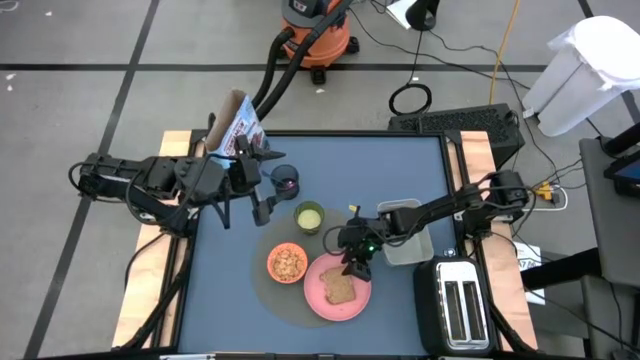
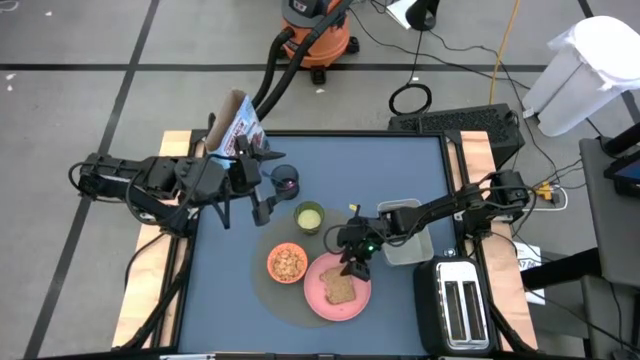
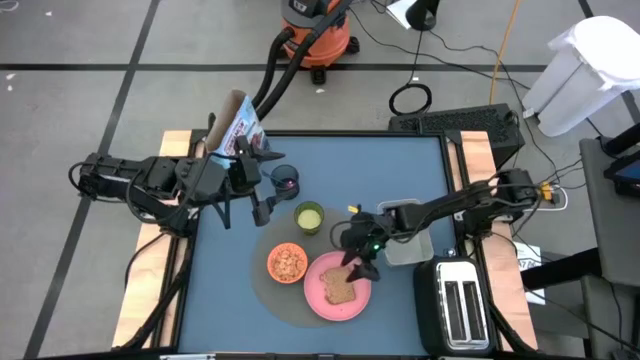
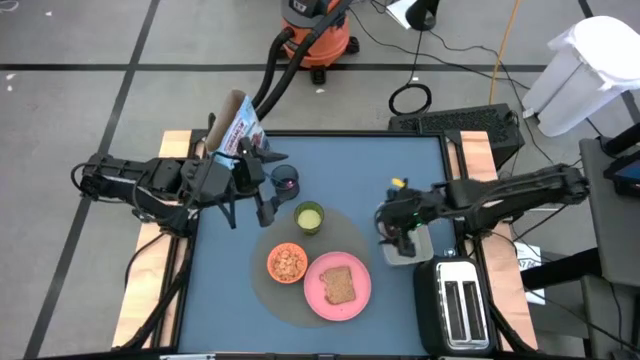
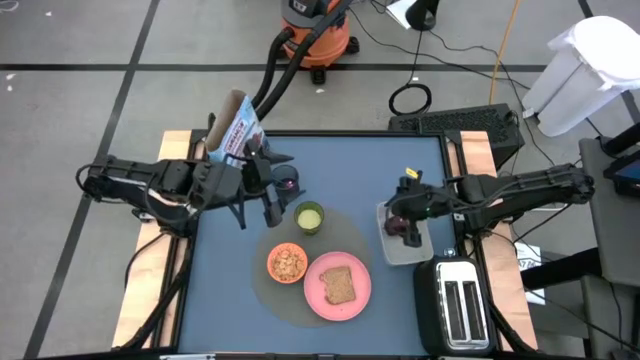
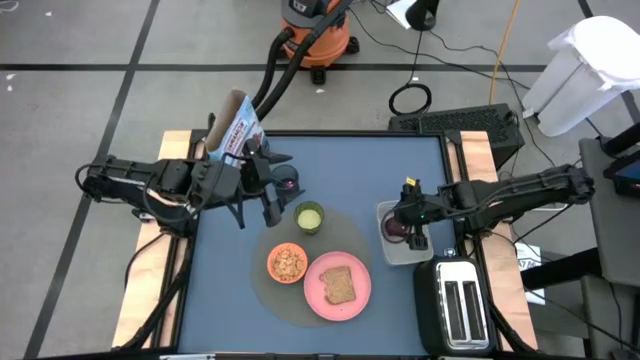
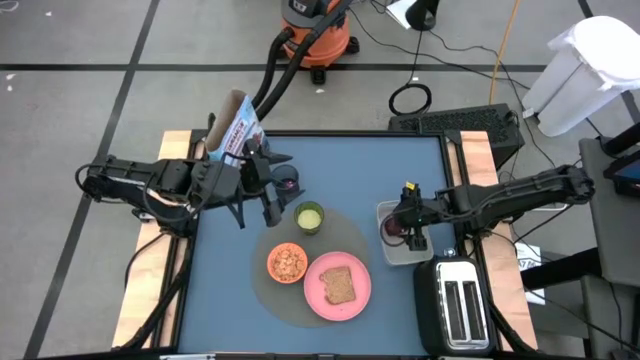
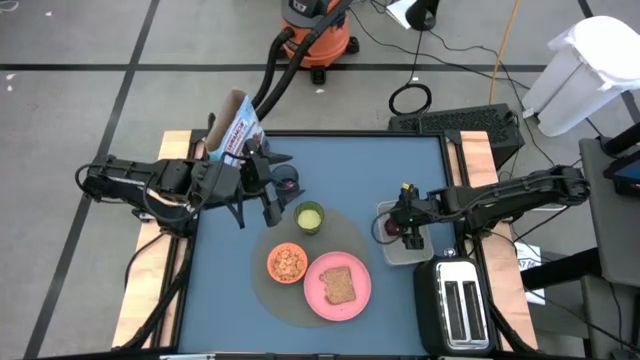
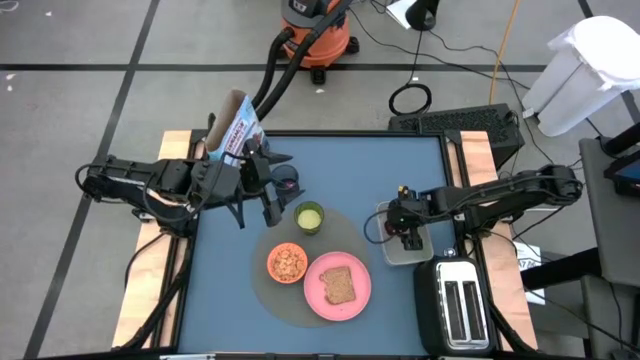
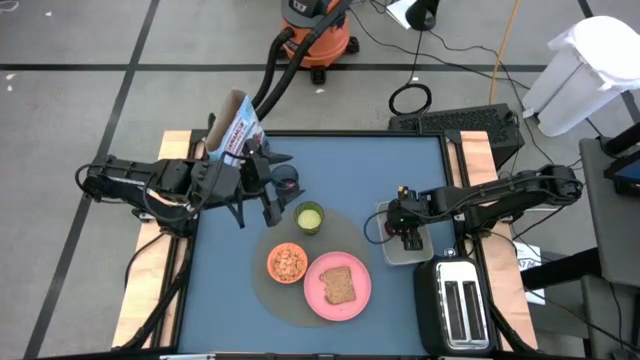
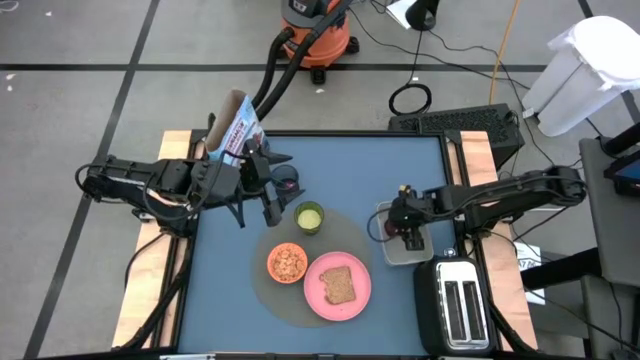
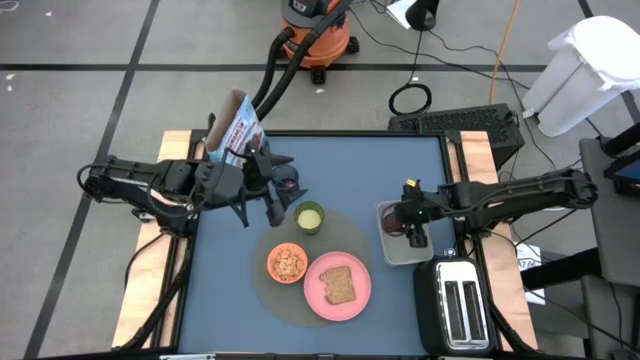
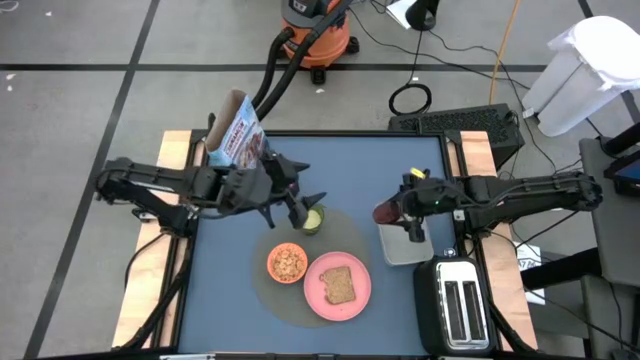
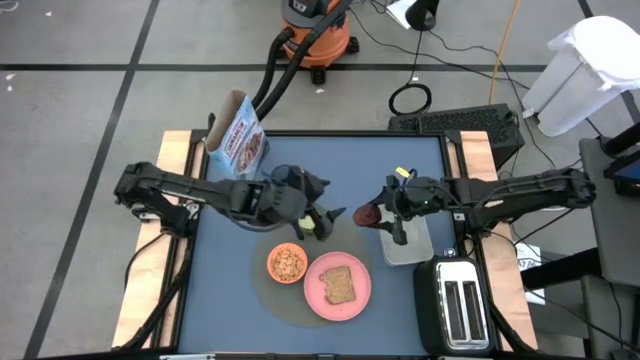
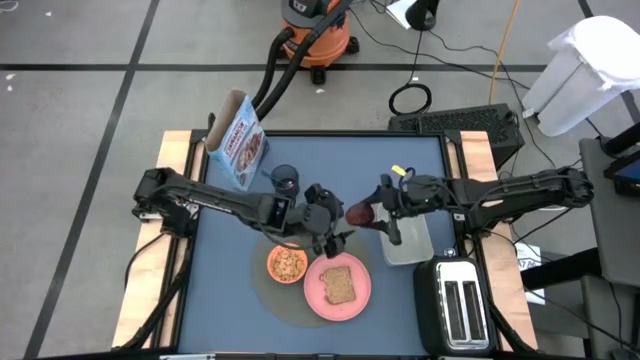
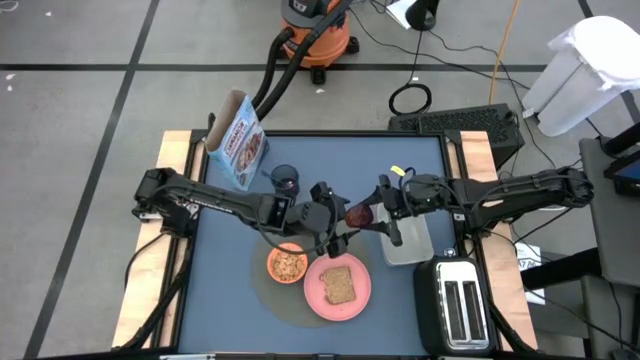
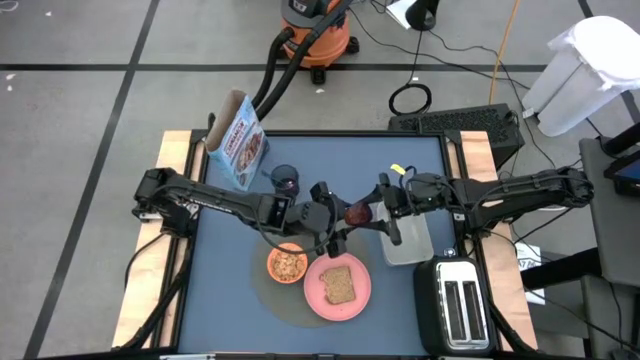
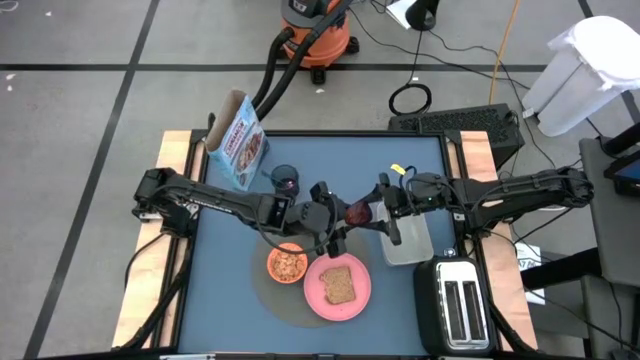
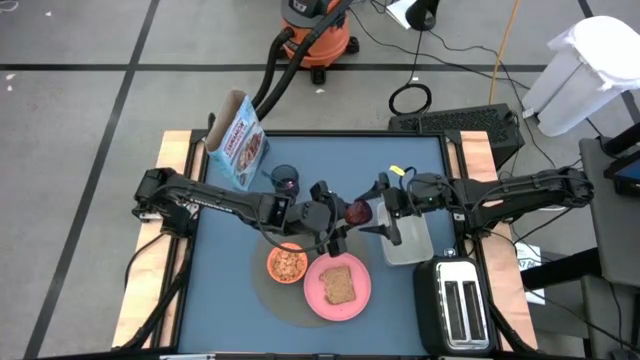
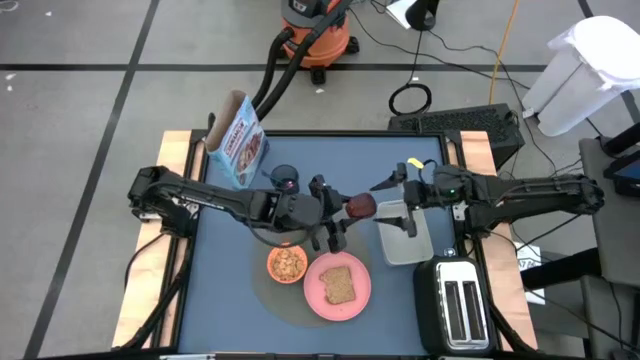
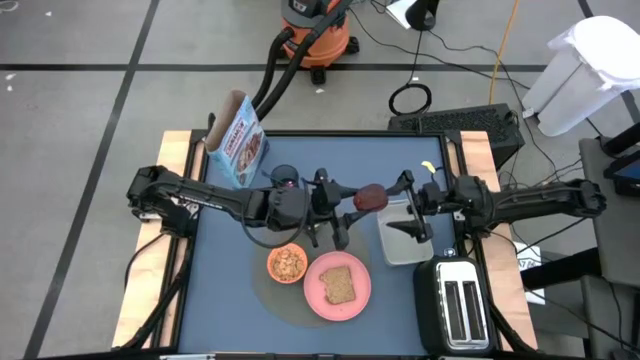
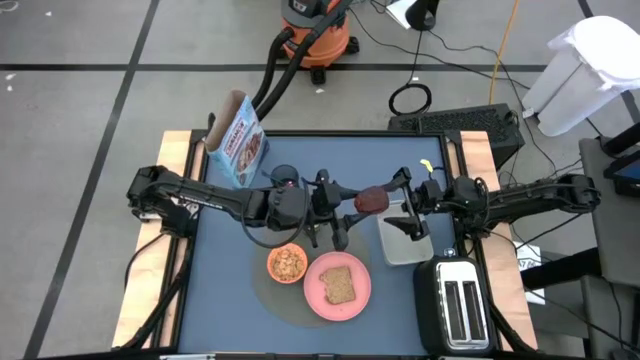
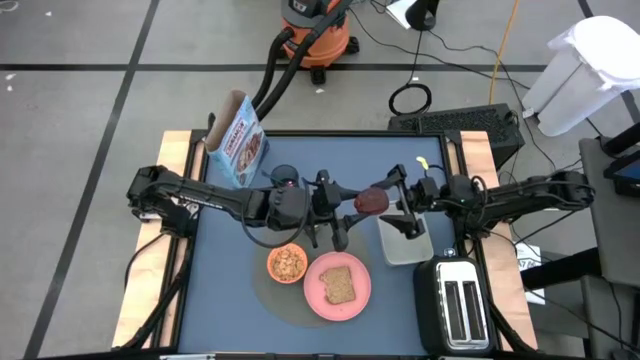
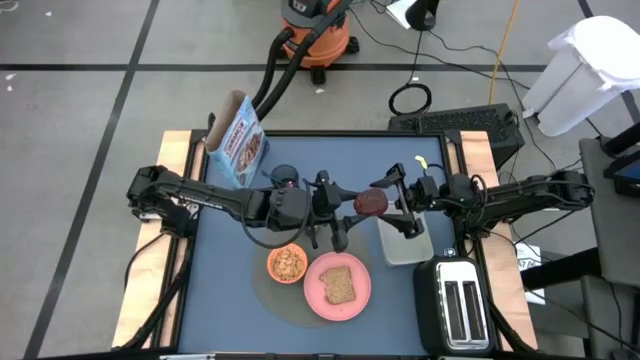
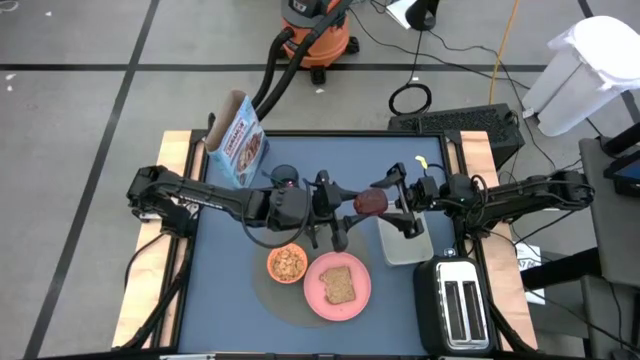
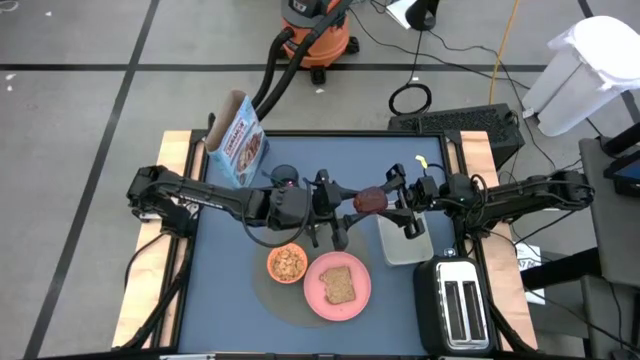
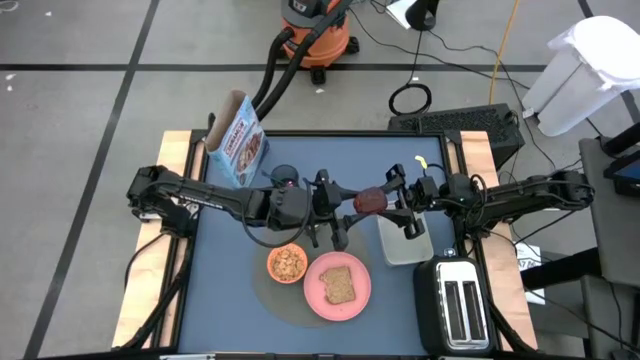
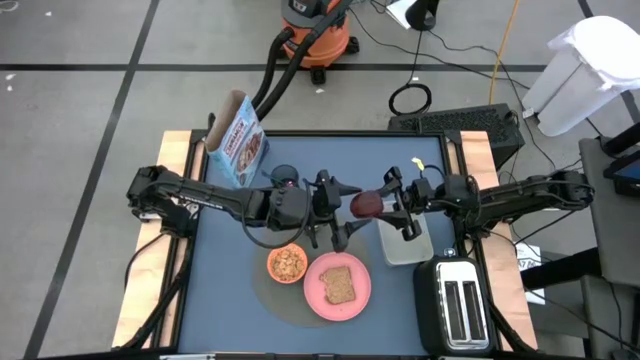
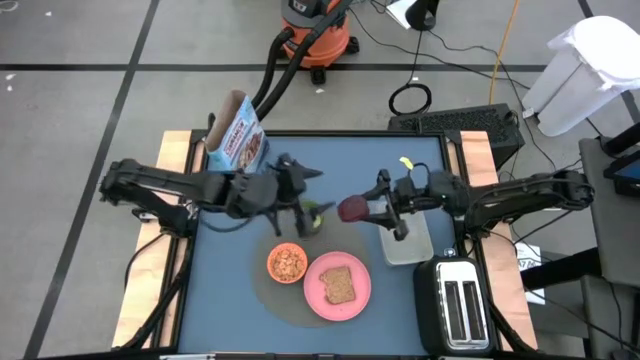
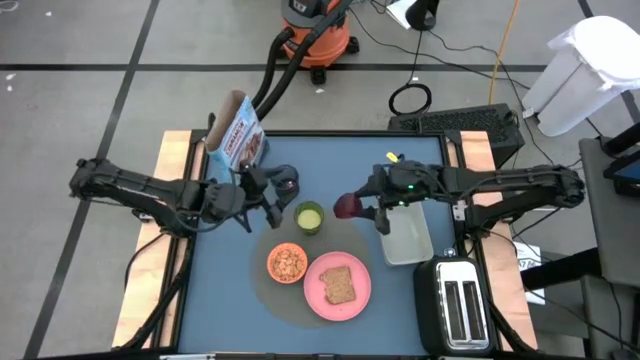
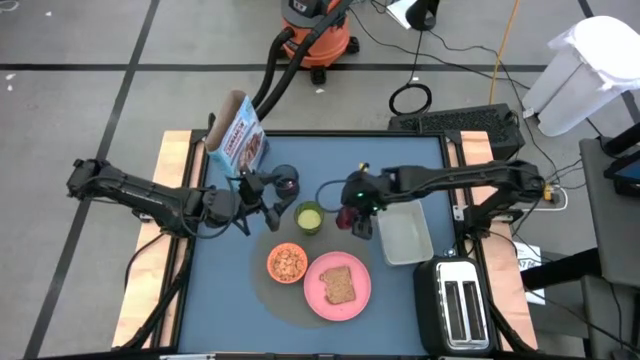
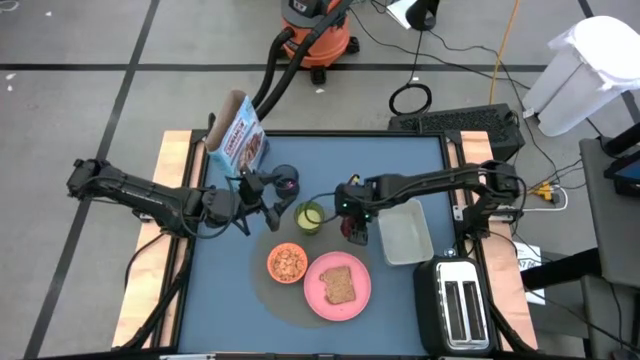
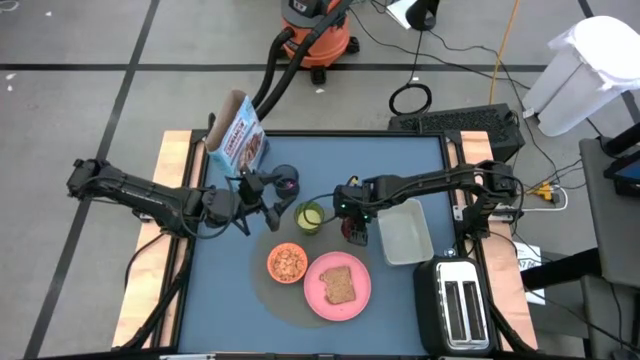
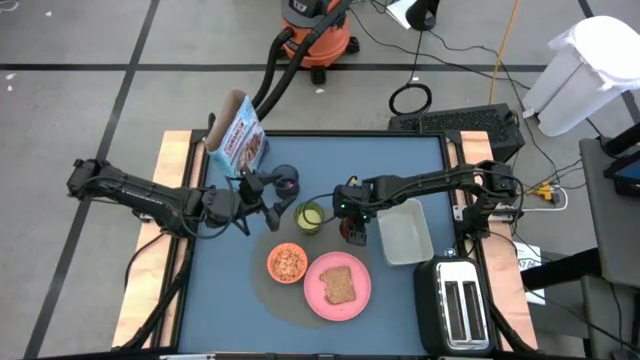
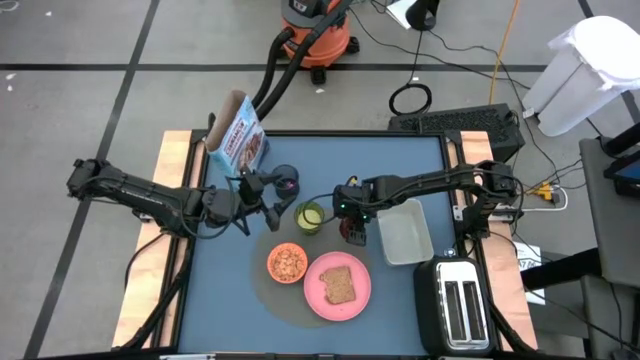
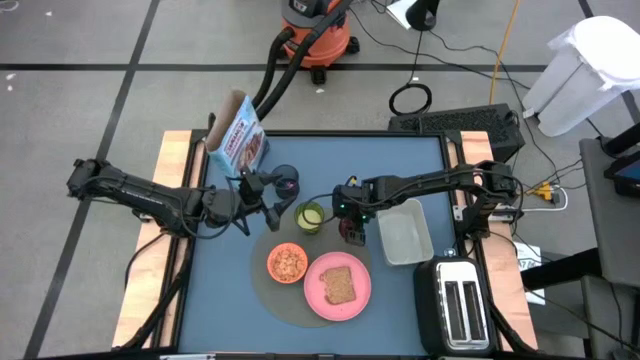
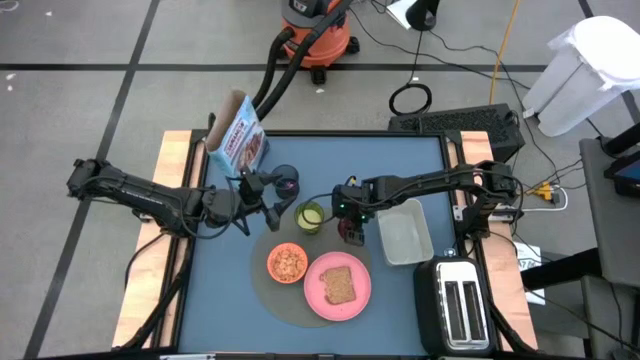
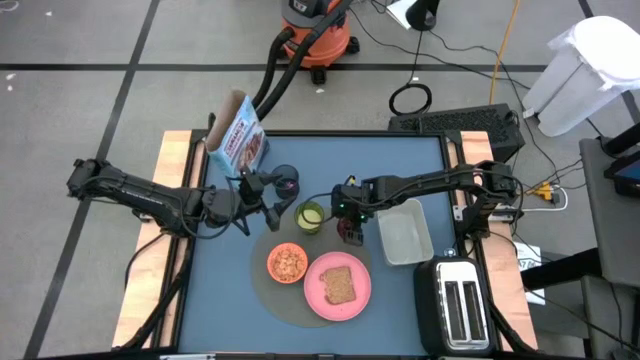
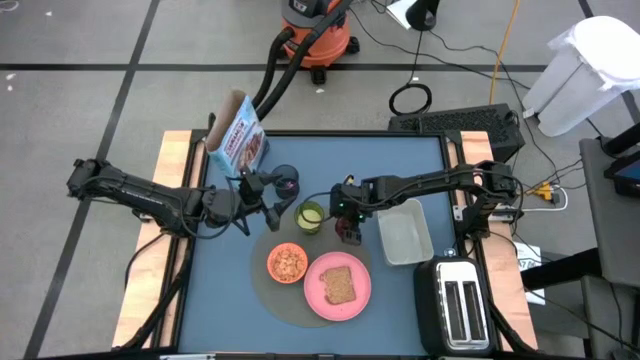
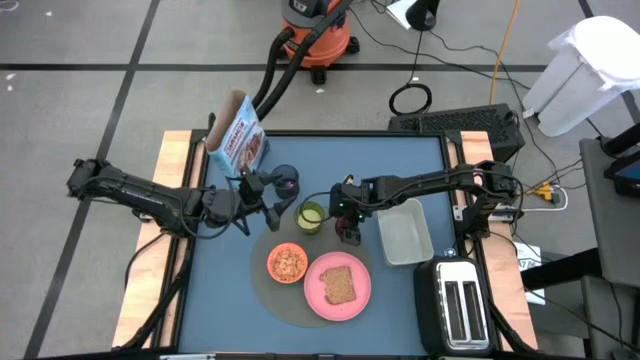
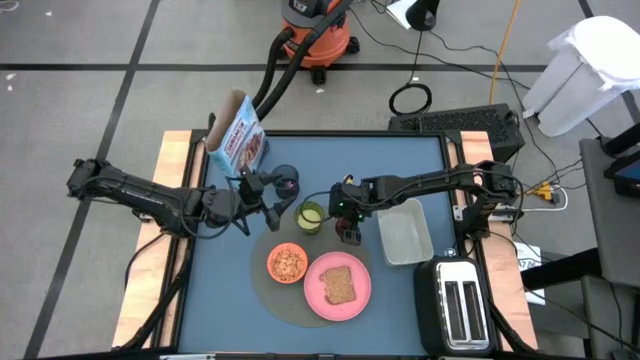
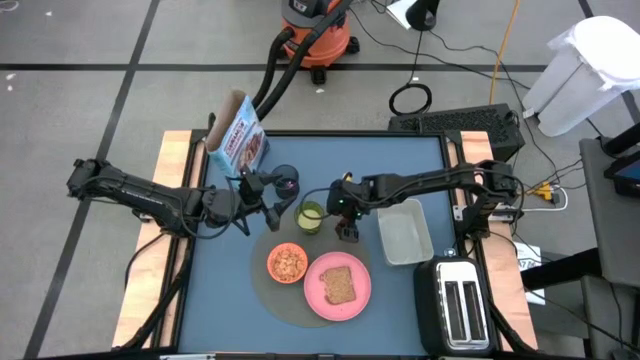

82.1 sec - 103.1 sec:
Task: Arrange a breakfast setting
Put the apple on the gray placemat to the right of the cup of milk
